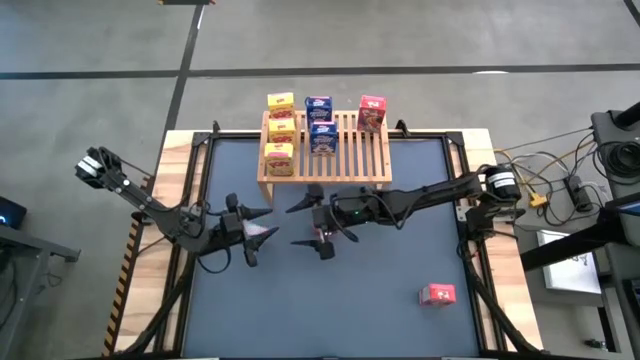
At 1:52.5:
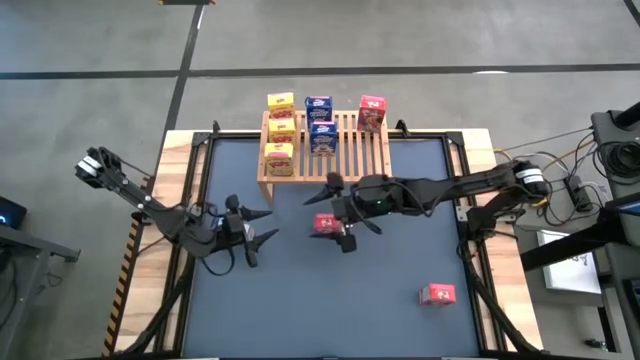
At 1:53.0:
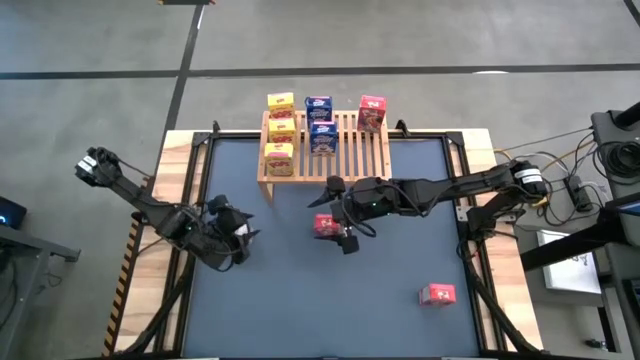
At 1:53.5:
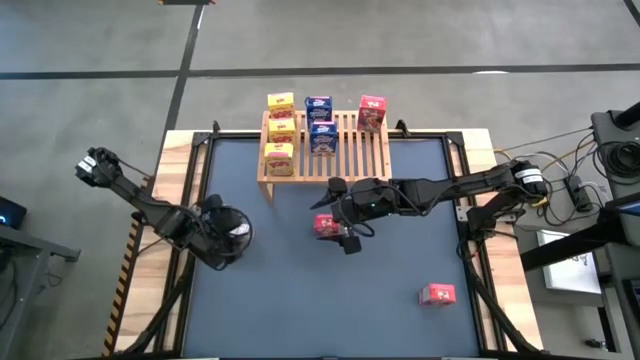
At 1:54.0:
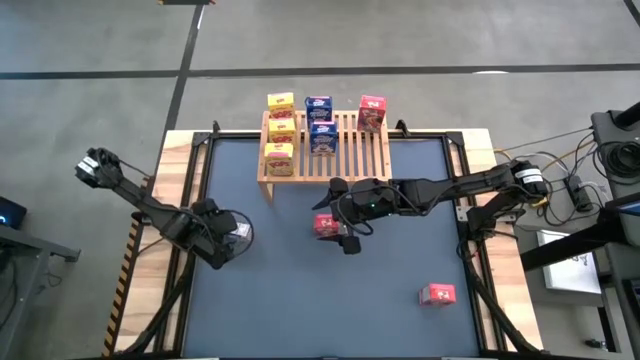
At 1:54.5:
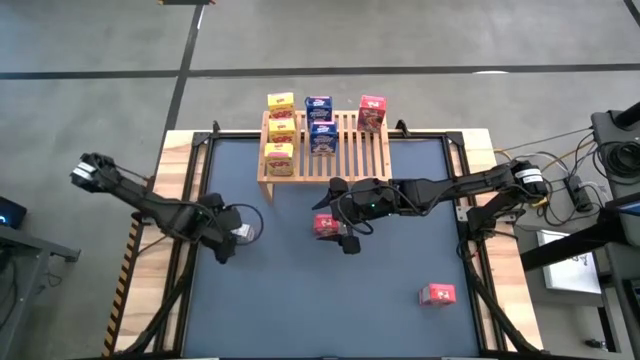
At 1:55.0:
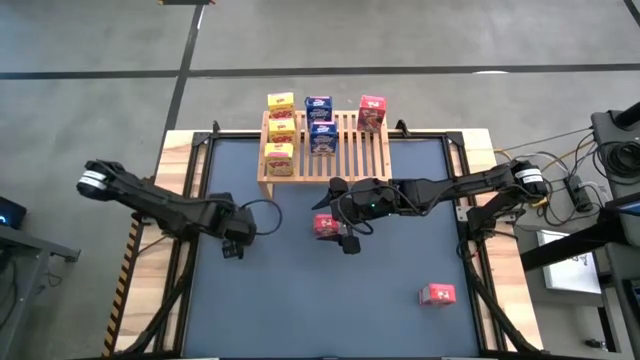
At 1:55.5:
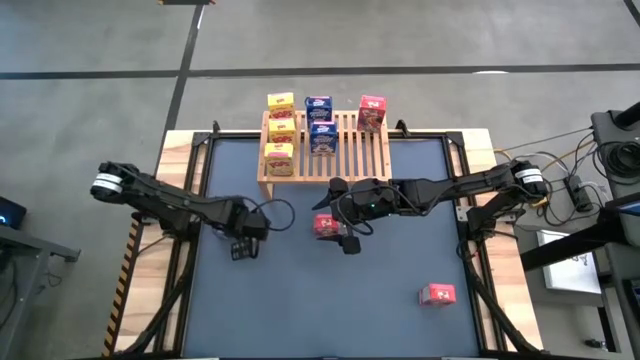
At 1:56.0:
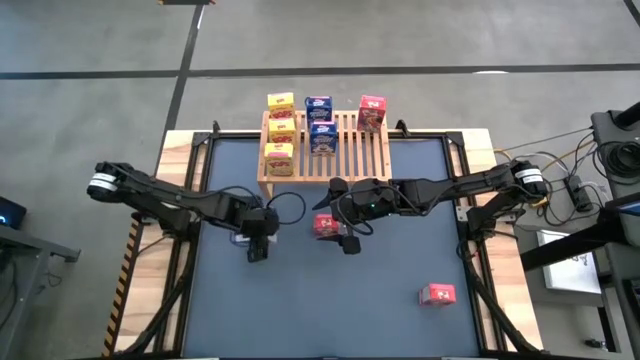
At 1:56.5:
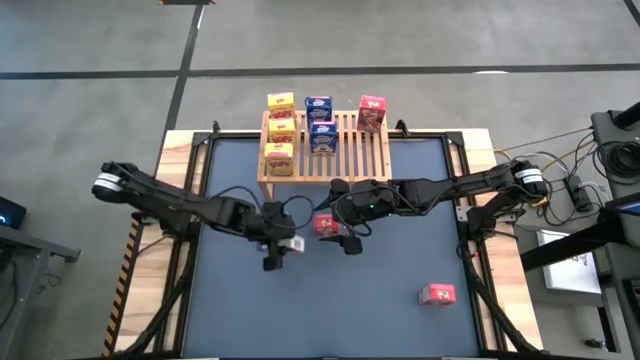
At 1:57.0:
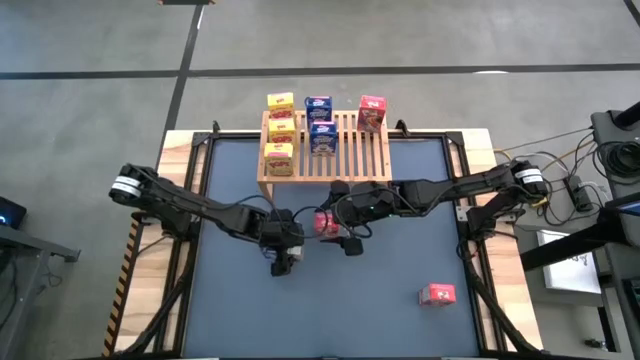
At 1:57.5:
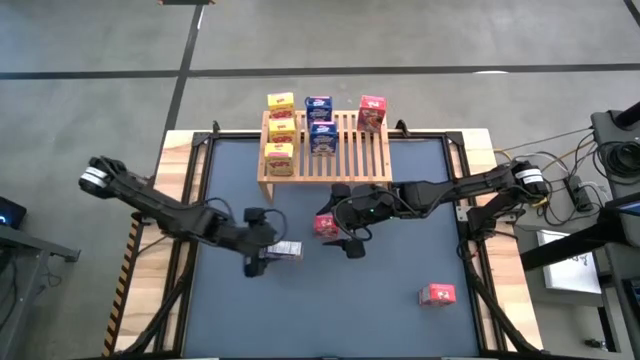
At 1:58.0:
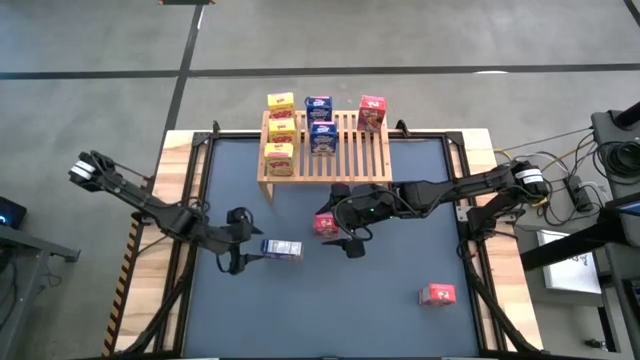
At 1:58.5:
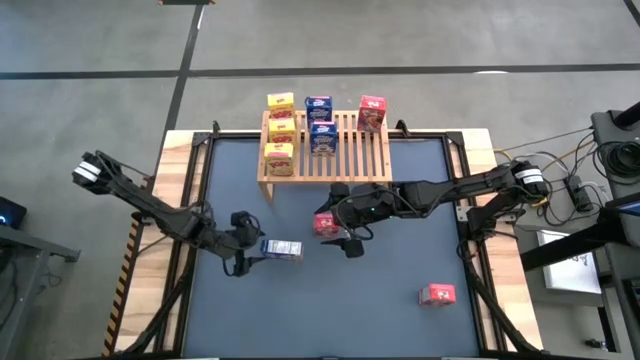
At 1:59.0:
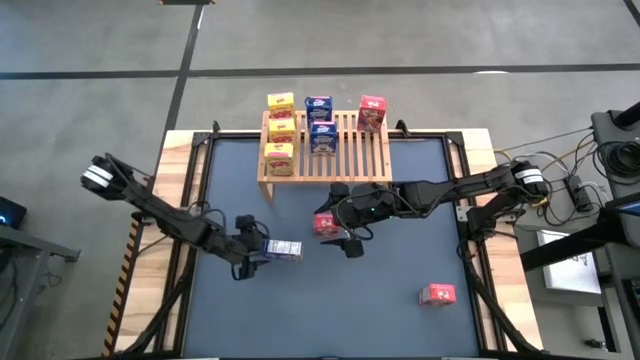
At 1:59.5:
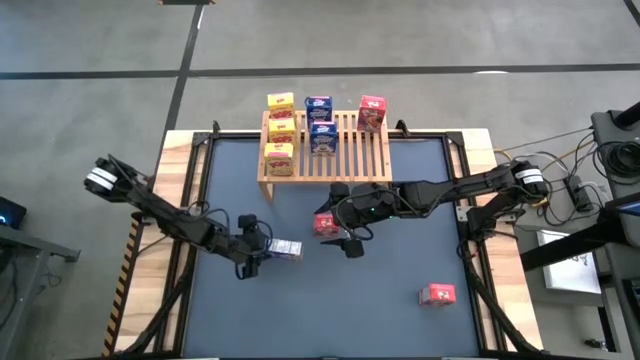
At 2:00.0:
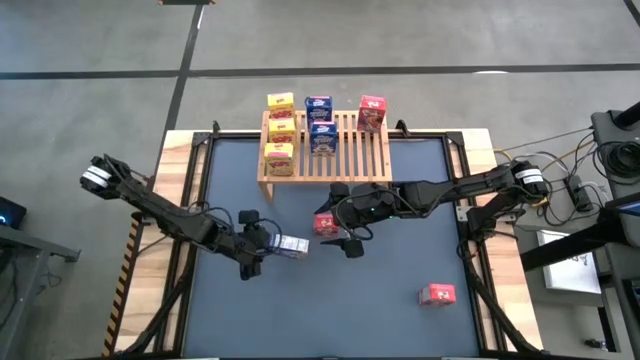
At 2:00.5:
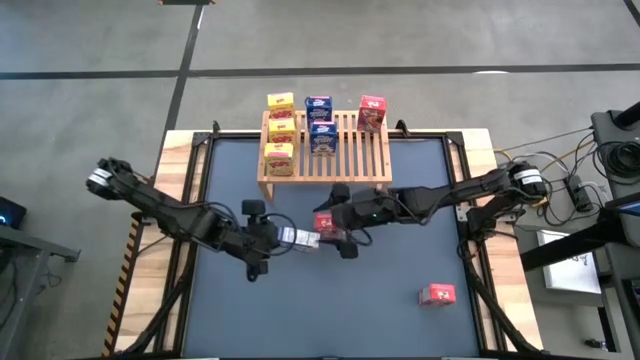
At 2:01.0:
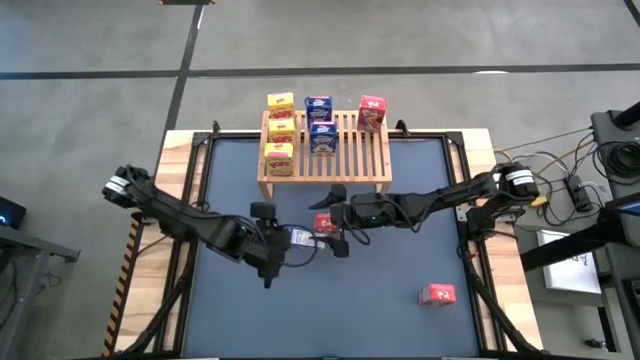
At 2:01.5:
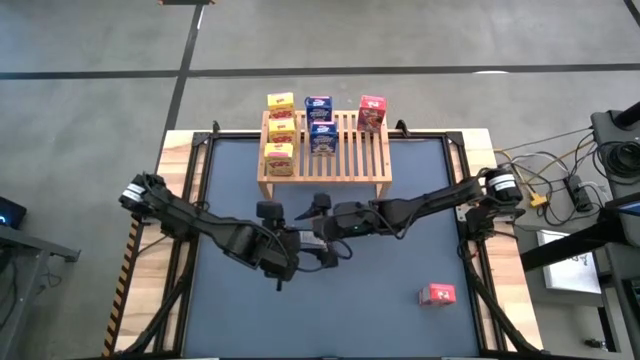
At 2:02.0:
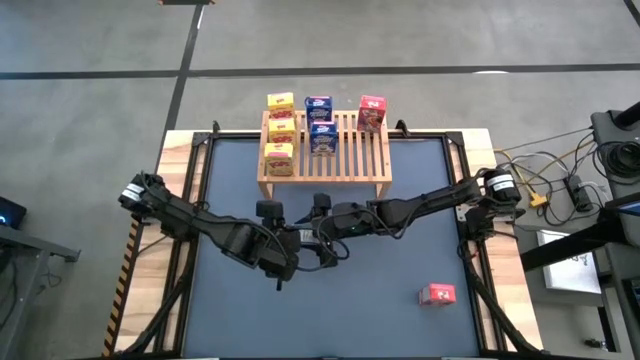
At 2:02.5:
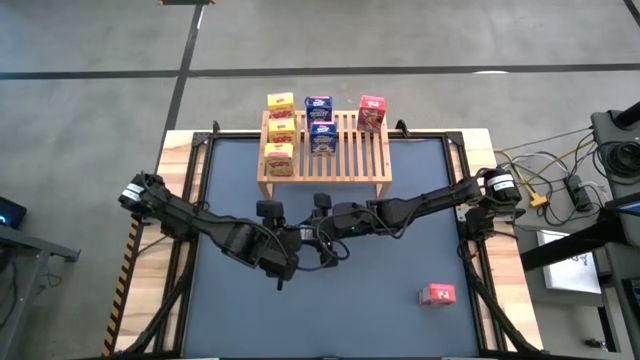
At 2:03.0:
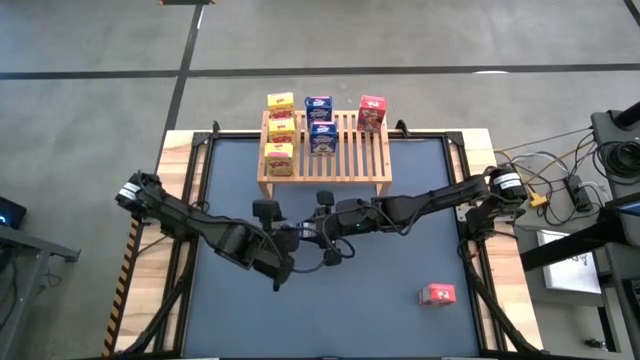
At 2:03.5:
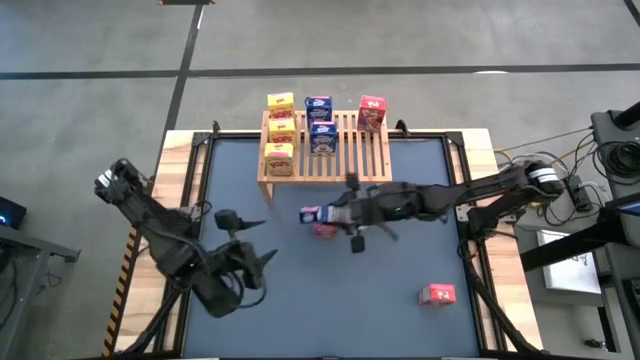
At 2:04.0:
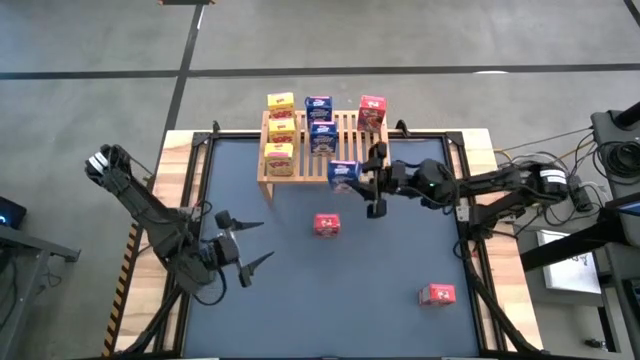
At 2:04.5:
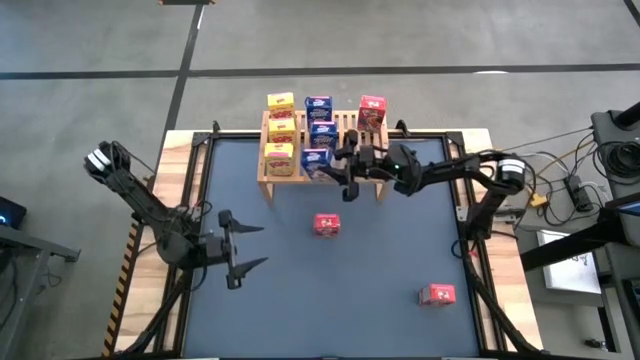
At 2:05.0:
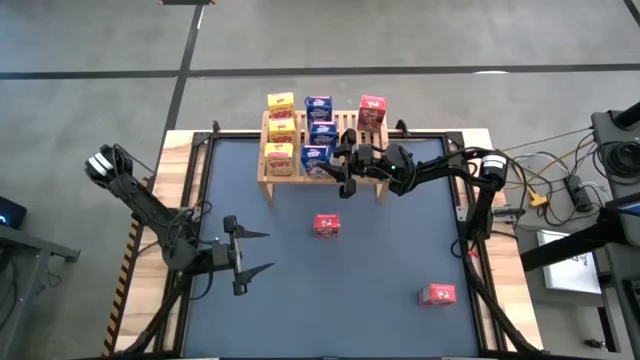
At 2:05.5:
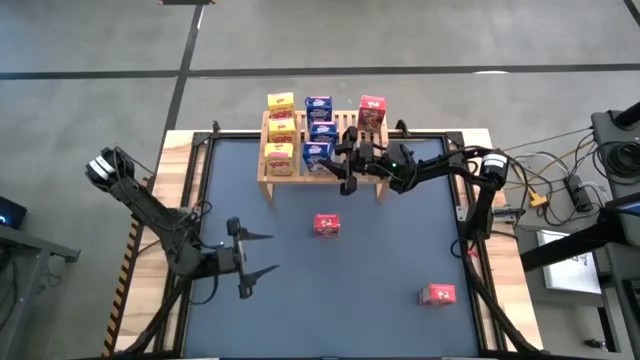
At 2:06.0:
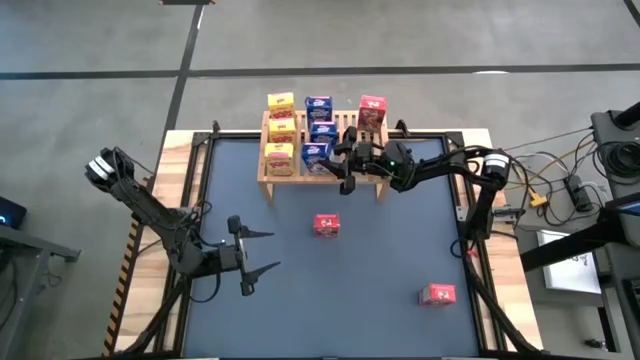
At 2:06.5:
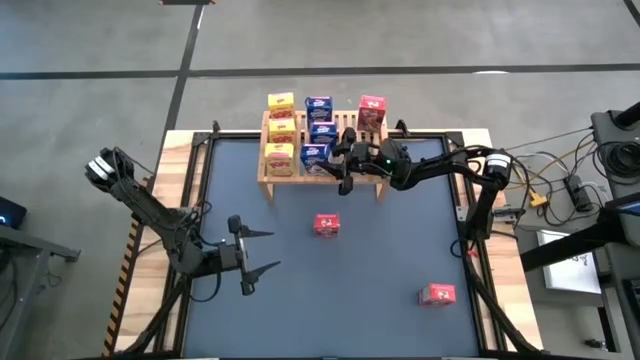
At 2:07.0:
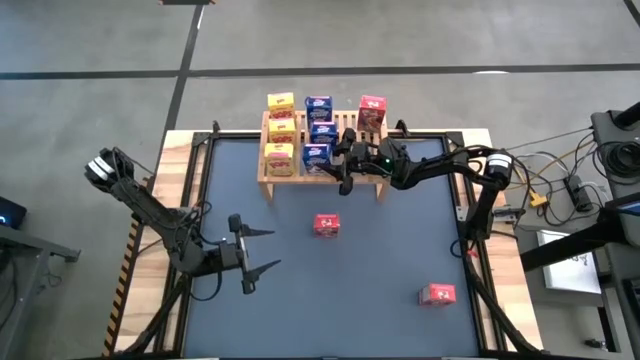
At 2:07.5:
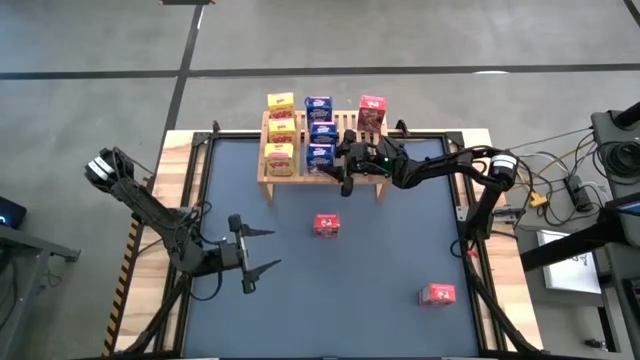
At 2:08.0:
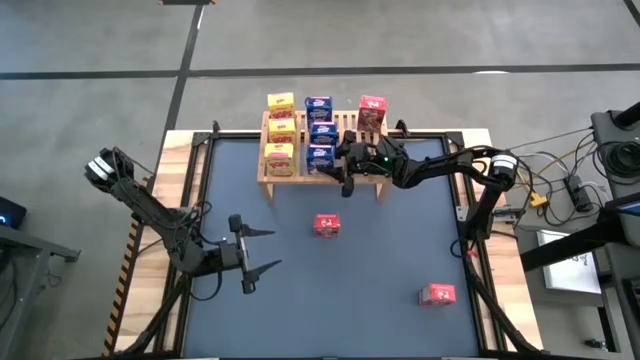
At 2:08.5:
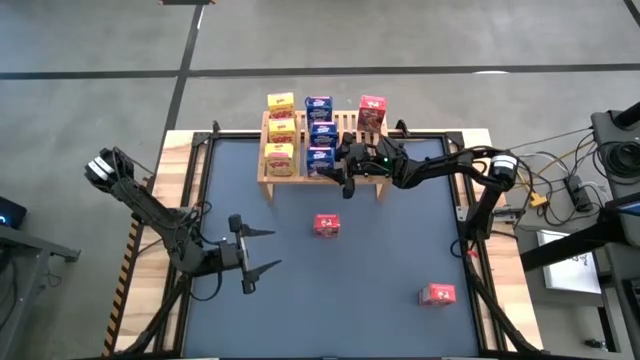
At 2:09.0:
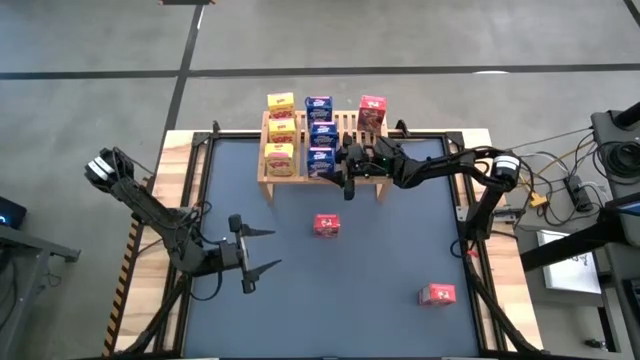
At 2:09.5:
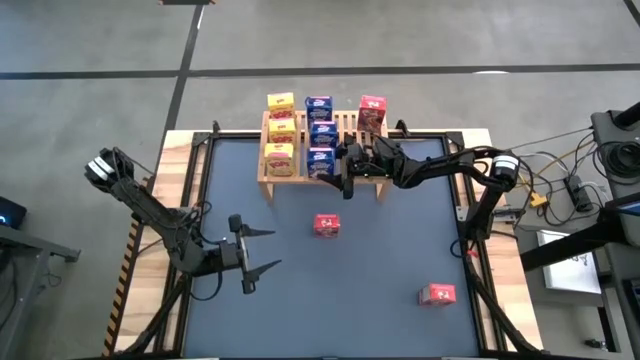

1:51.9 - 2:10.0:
Task: Stack cereal on shelf
Put the blue cereal box on the shelf aligned with the other blue cereal box

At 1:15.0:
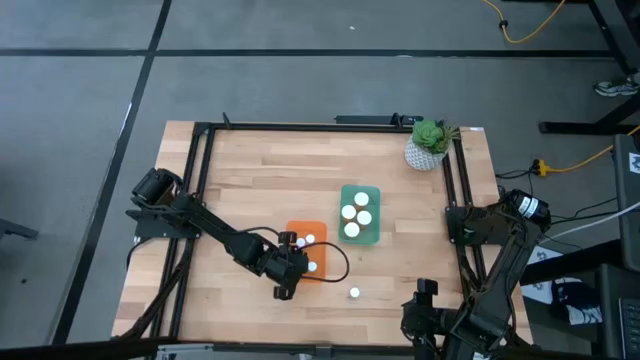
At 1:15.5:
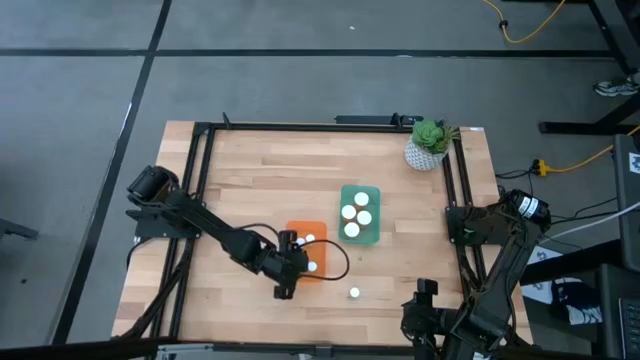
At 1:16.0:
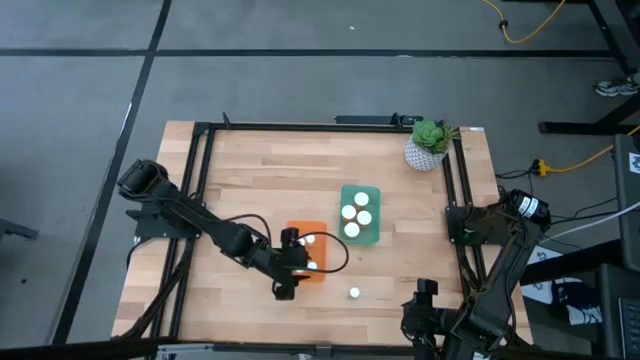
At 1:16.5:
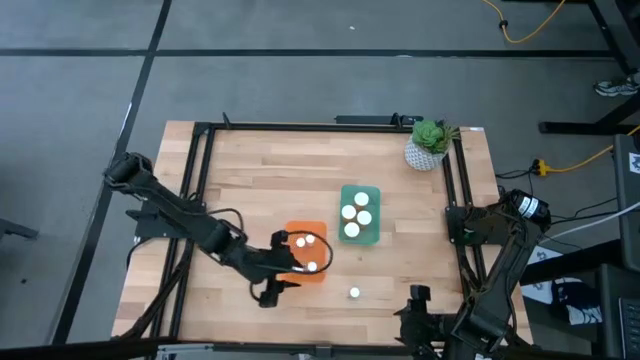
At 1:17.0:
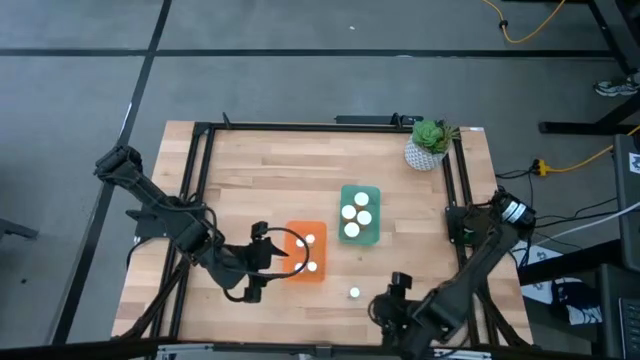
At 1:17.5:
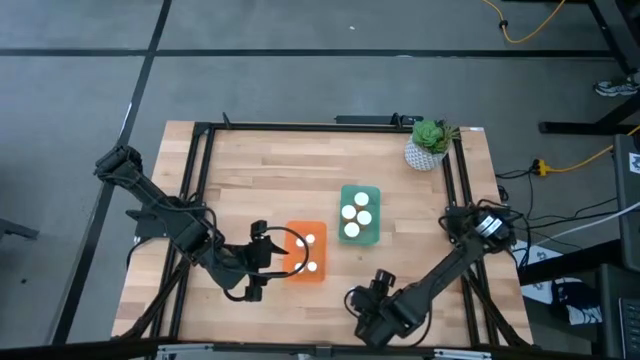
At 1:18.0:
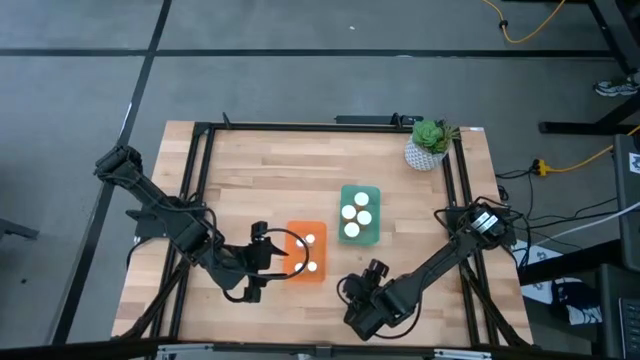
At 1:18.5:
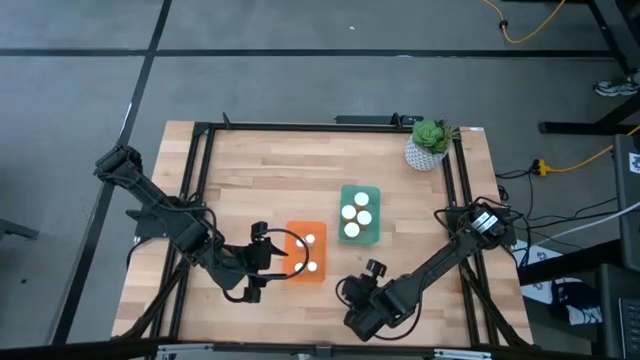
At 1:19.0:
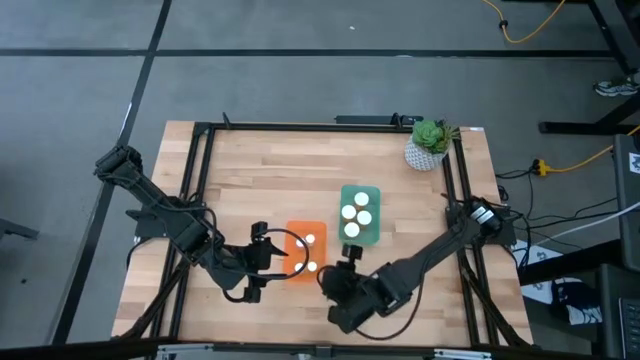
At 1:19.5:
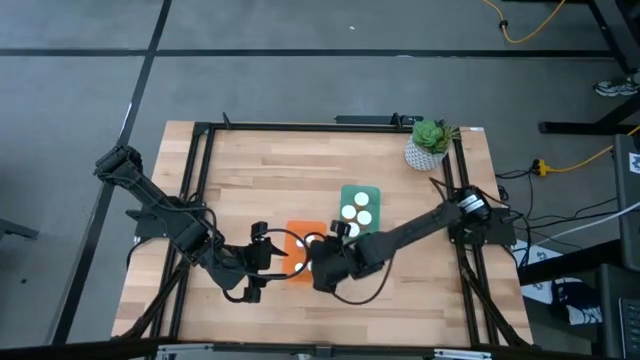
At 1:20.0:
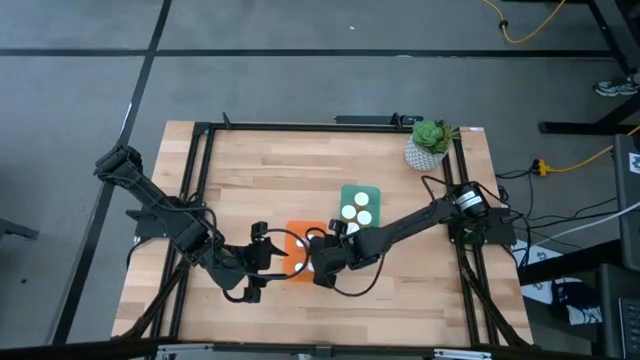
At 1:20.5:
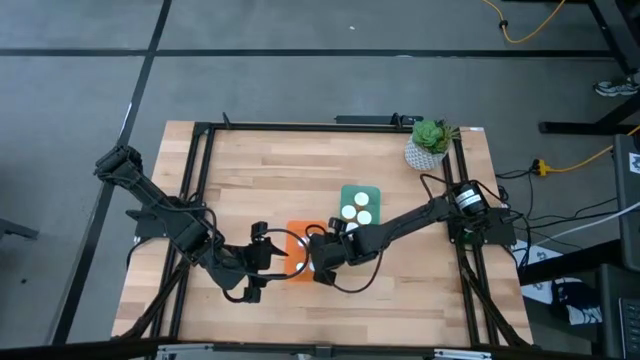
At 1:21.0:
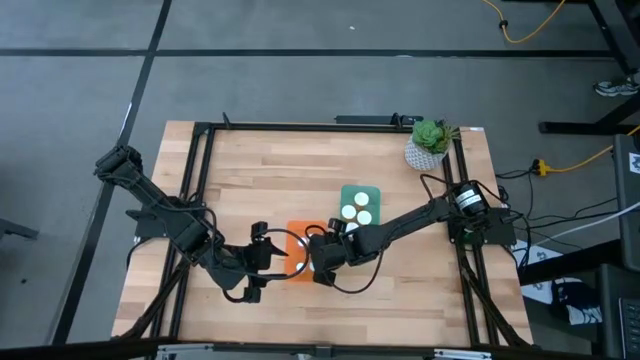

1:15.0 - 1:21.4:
Task: Pick and place medicine bottles into bin by pill shape (circle, oval)
Put the small green tablet bottle into the orange bin
